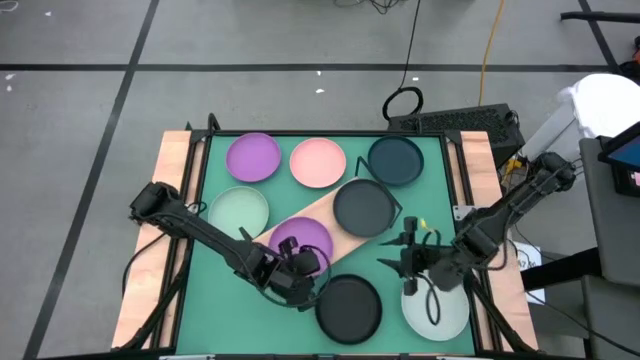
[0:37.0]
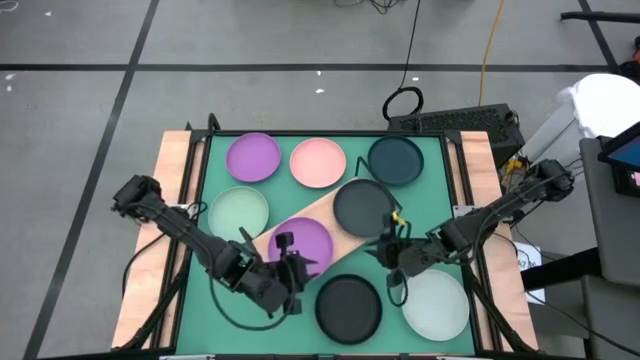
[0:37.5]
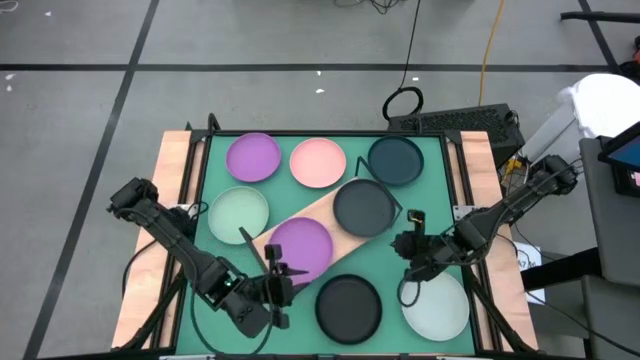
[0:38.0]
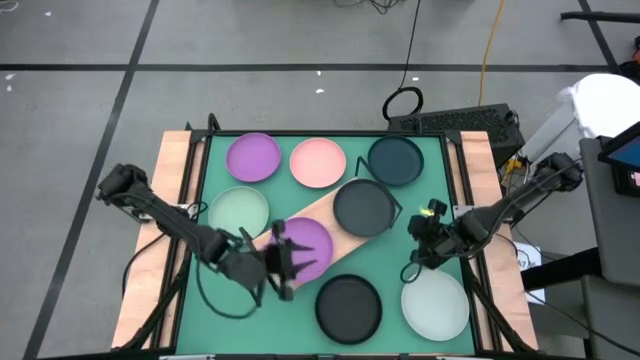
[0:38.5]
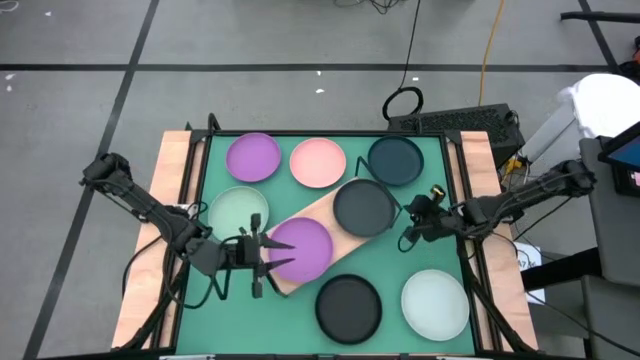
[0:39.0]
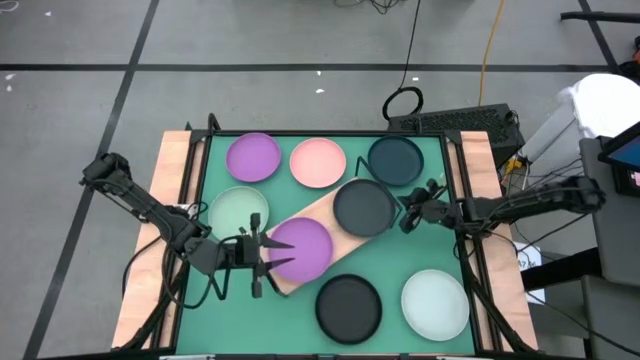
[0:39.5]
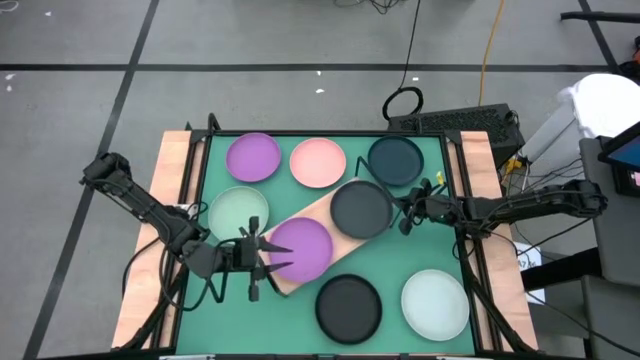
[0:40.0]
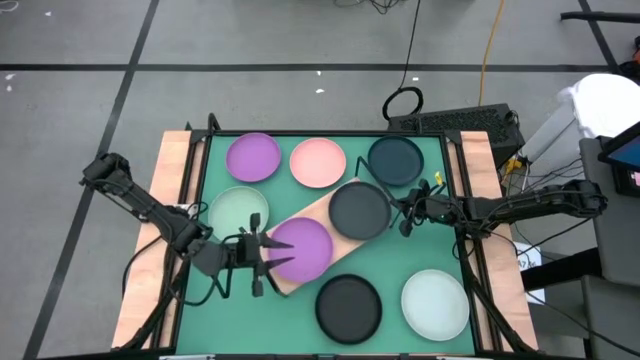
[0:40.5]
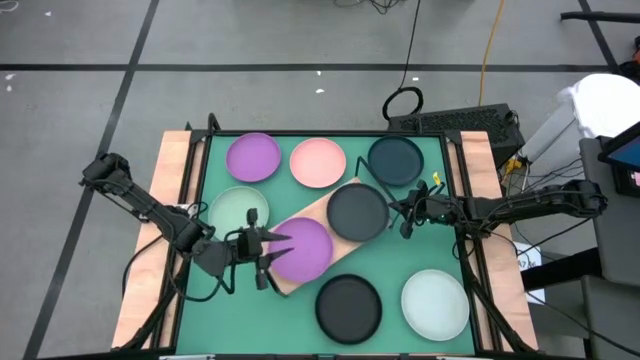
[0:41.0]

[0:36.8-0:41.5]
Task: Place and stack plates onto a shelf
Adjust the black plate on the shelf

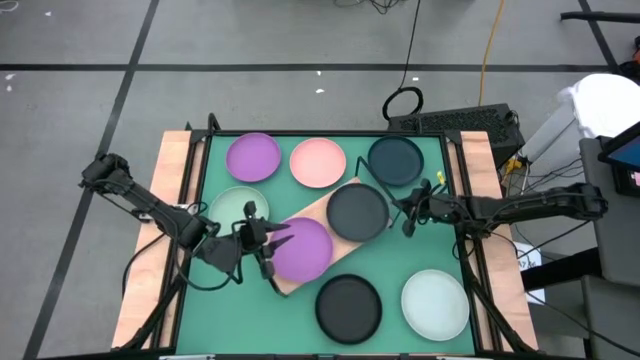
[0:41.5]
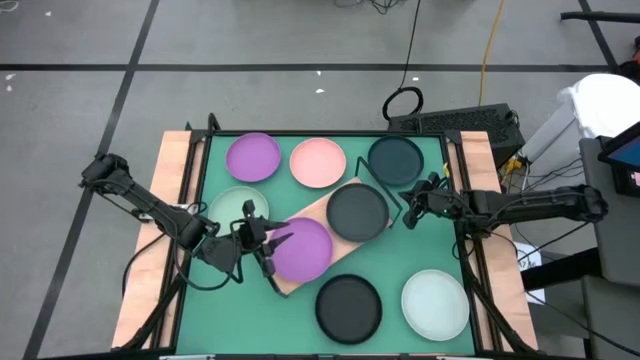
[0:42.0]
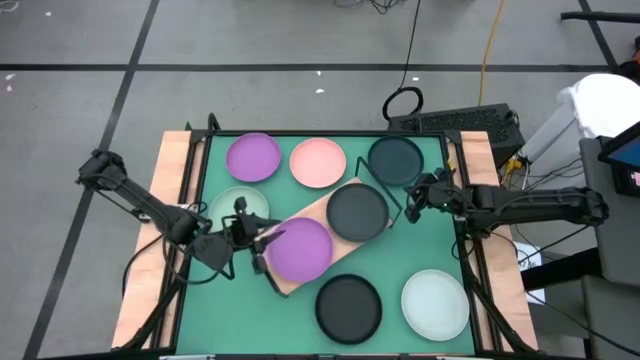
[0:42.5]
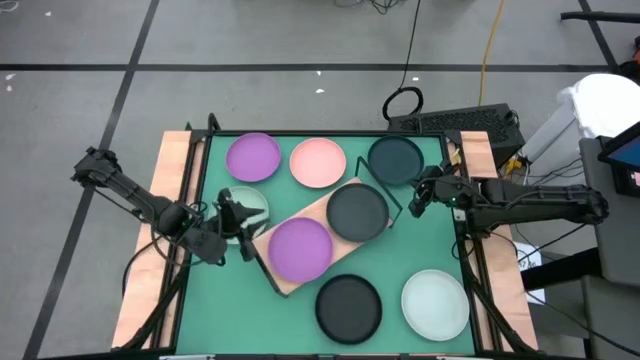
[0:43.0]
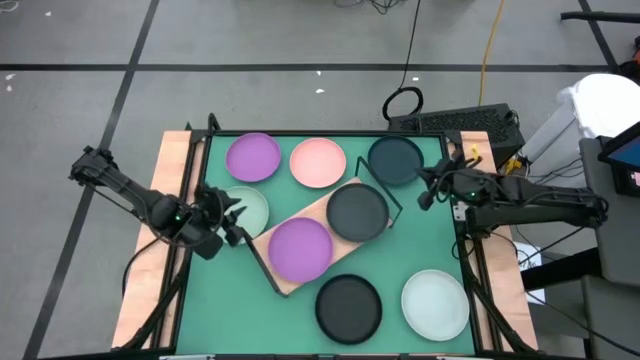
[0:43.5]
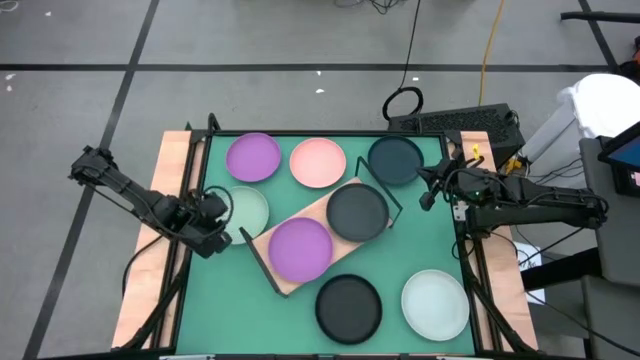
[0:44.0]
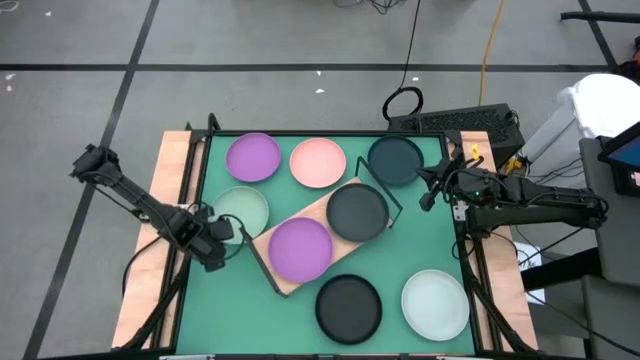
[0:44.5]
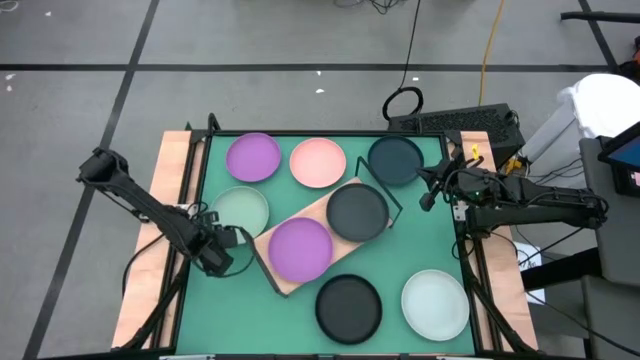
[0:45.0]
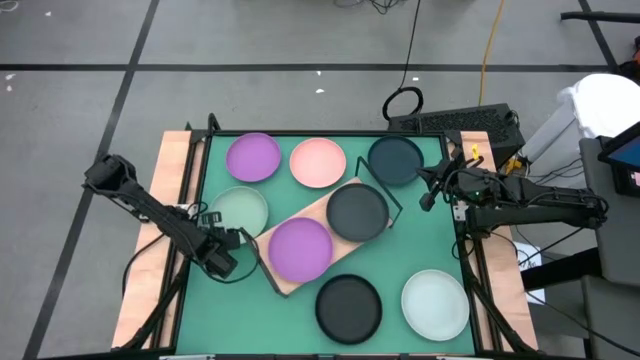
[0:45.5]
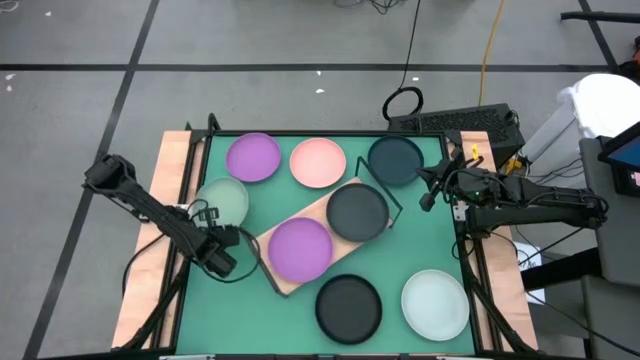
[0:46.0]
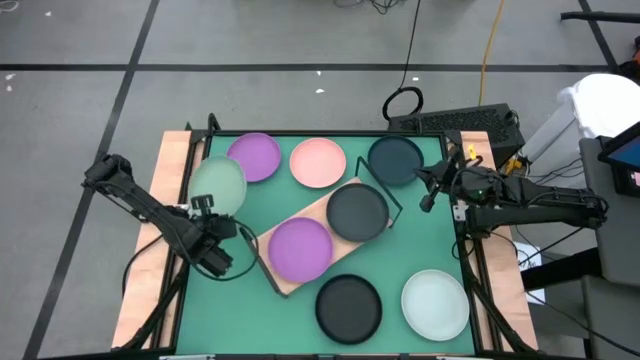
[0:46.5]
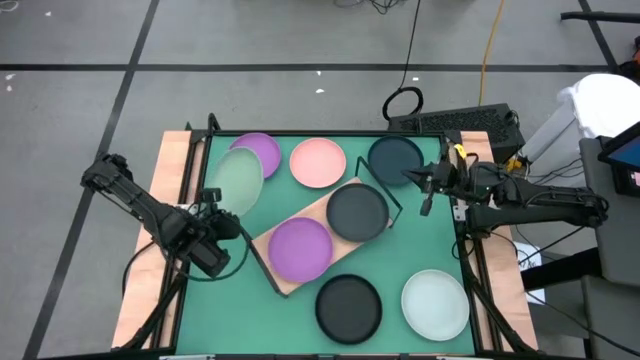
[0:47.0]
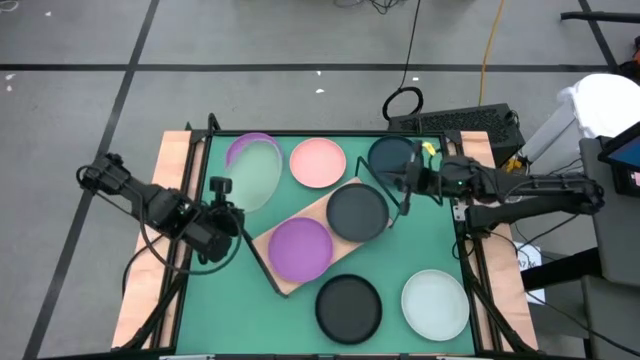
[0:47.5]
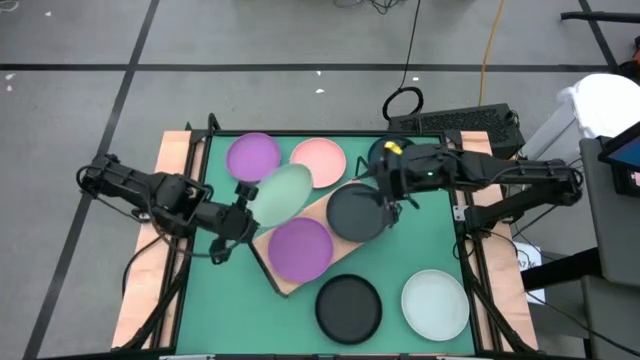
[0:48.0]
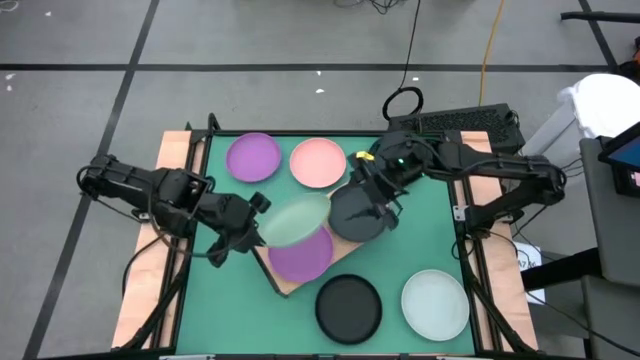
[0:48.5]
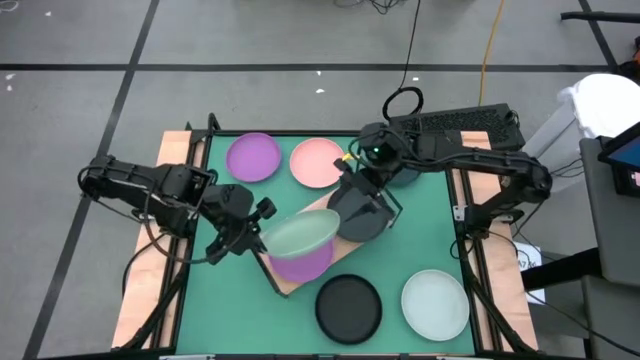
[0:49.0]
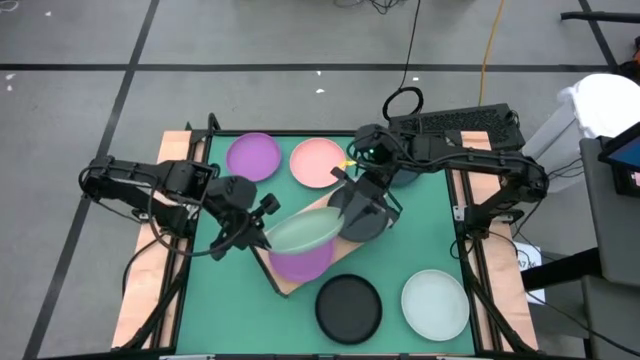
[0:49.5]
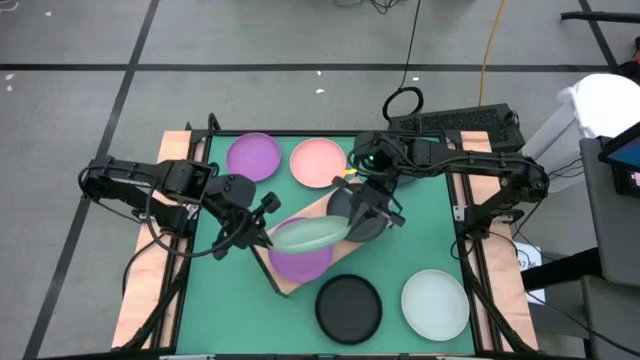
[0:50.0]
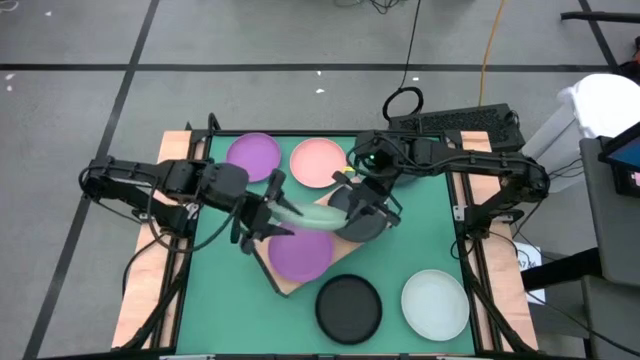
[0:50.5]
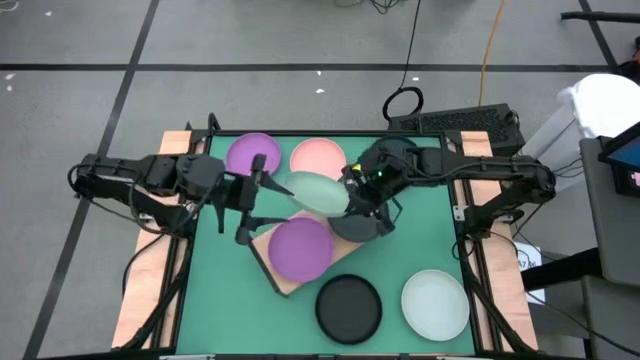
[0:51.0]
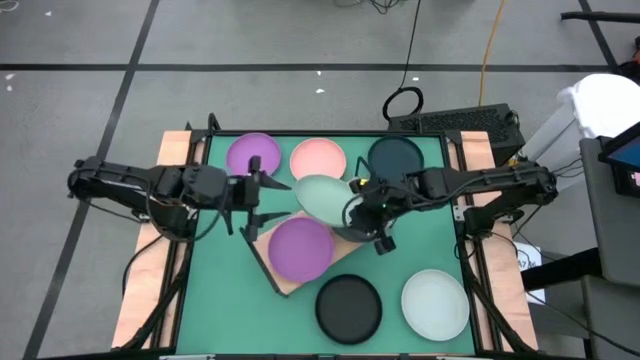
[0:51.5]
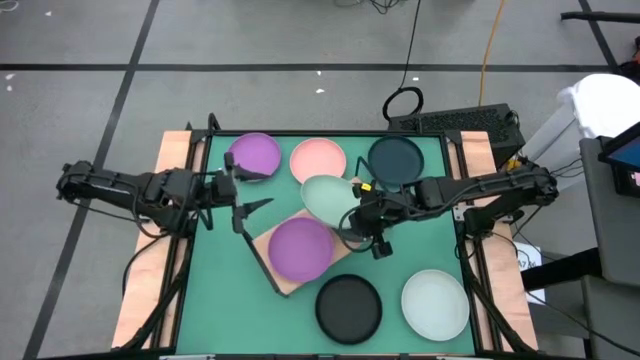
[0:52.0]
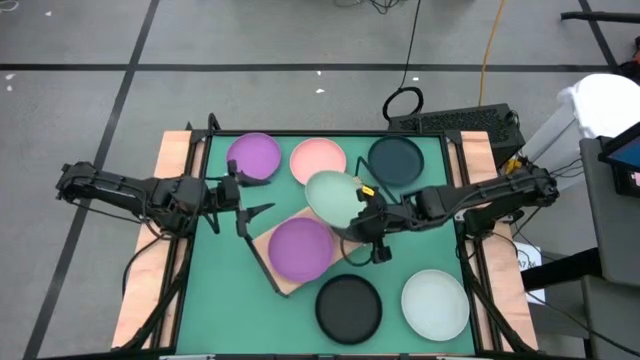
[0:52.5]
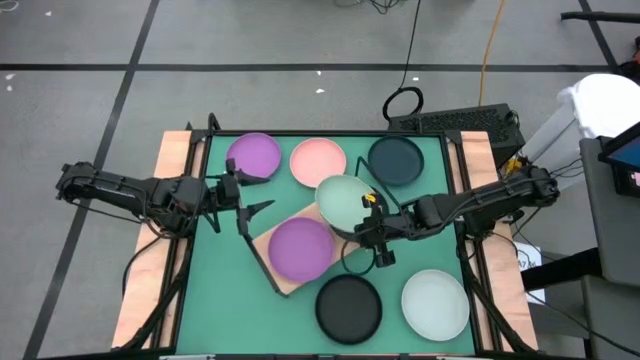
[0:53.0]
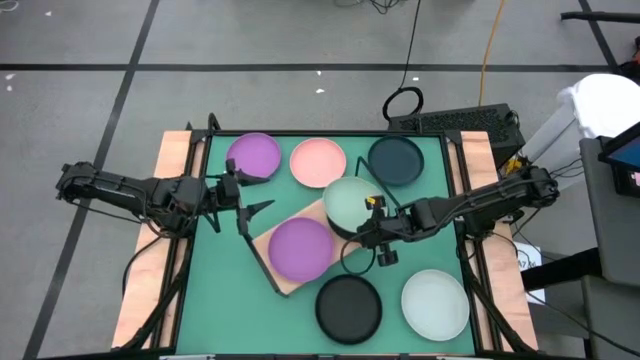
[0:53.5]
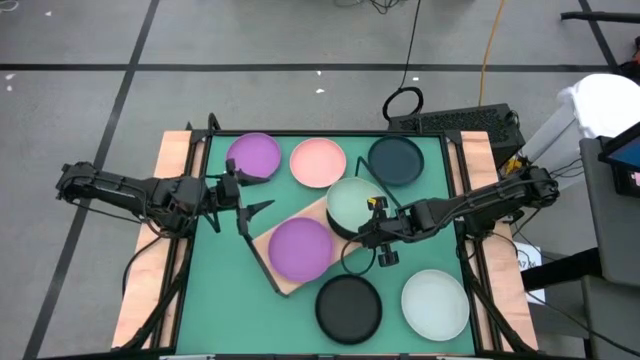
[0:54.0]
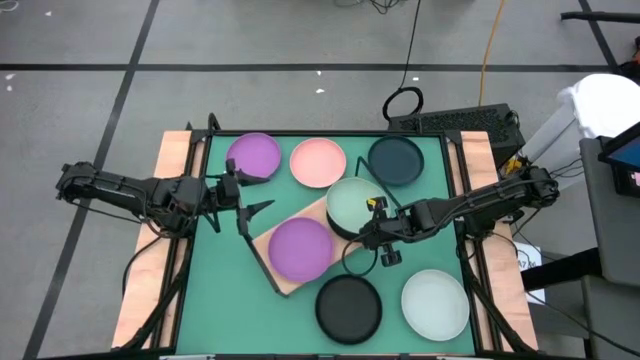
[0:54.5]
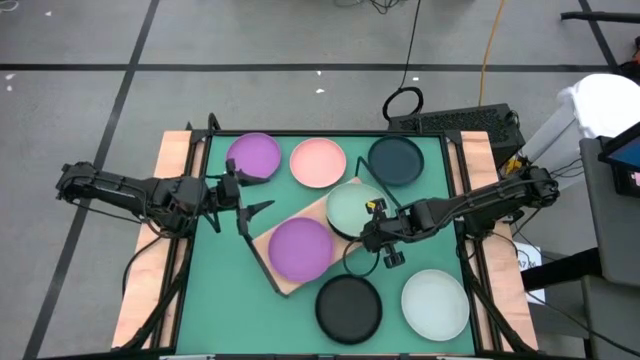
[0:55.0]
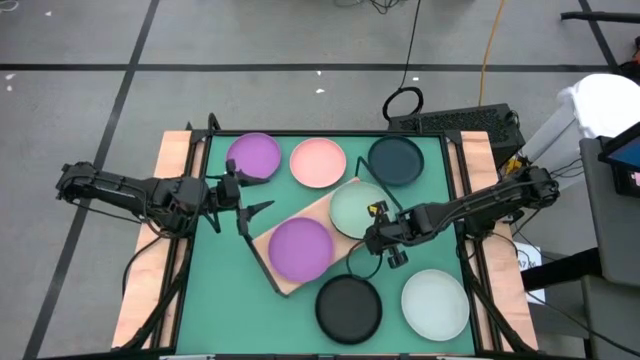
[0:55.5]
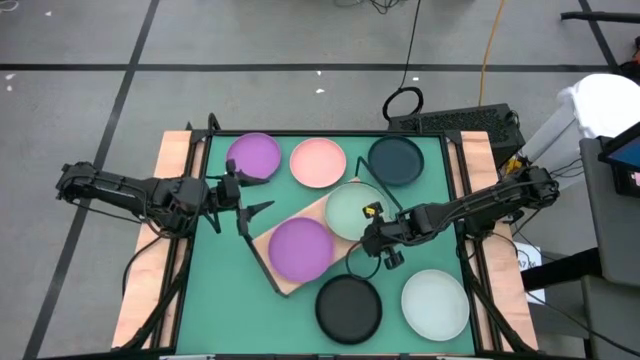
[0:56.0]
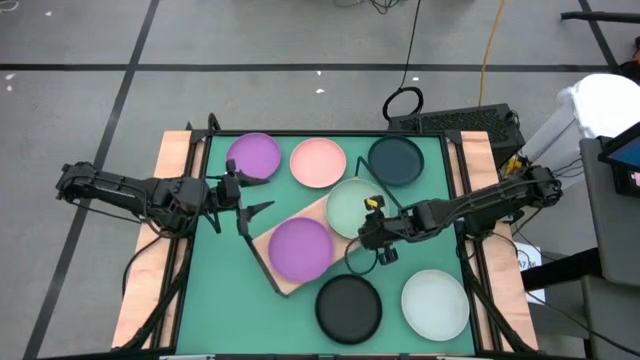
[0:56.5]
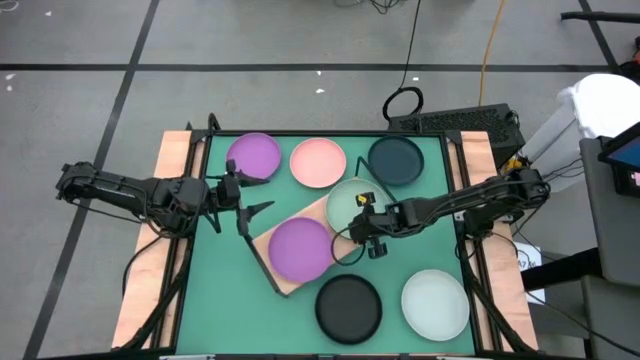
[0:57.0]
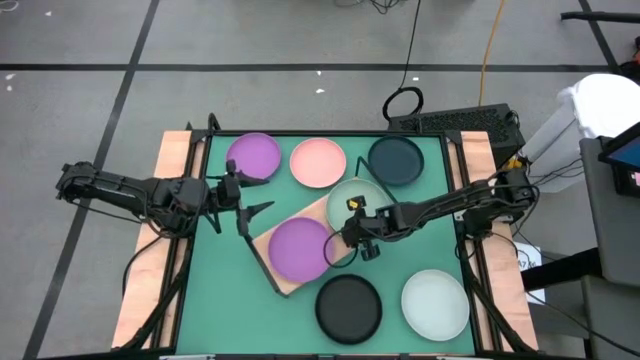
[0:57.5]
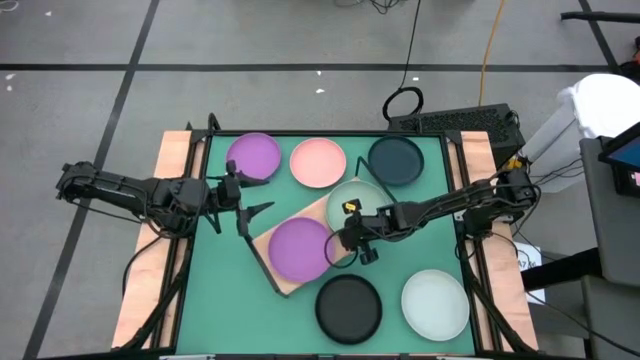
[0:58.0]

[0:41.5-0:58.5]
Stack the green plate on top of the black plate on the shelf
